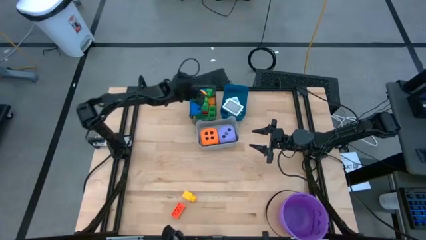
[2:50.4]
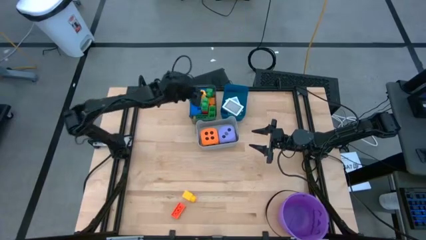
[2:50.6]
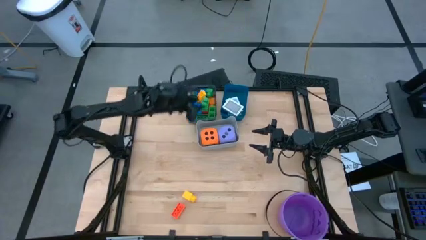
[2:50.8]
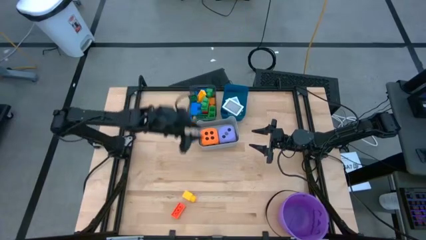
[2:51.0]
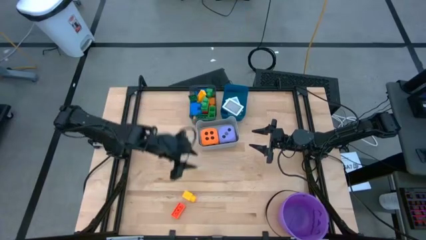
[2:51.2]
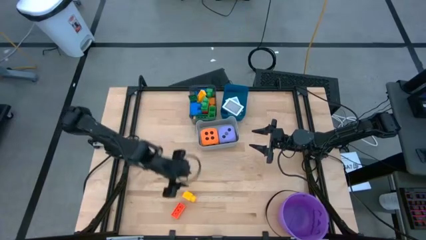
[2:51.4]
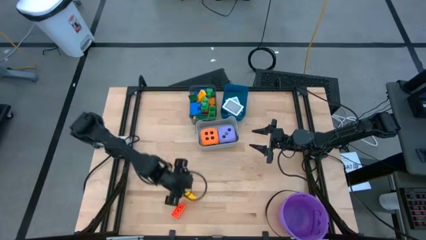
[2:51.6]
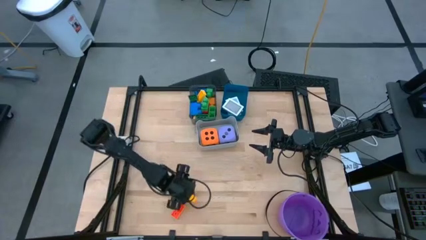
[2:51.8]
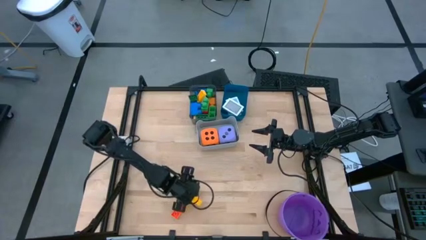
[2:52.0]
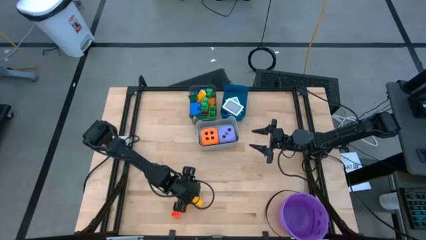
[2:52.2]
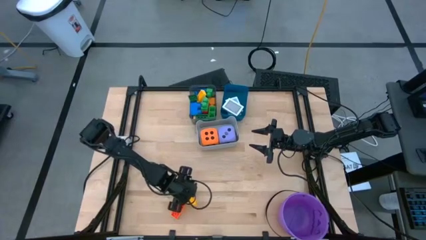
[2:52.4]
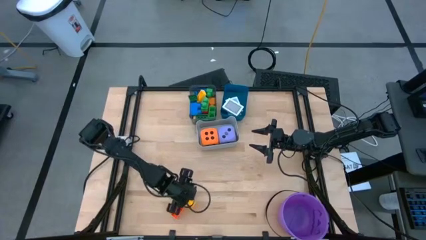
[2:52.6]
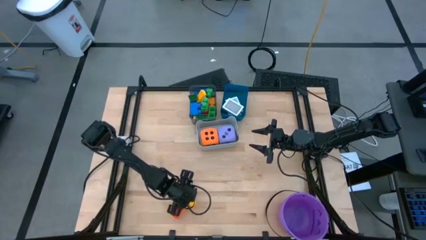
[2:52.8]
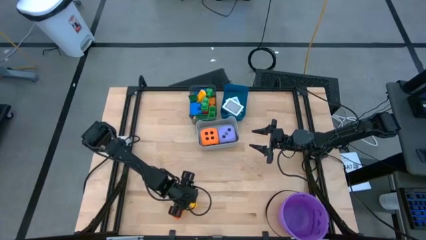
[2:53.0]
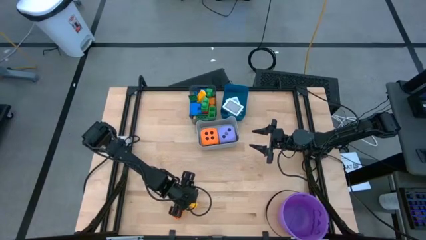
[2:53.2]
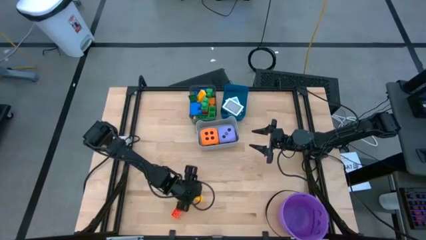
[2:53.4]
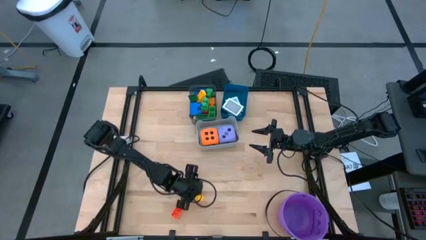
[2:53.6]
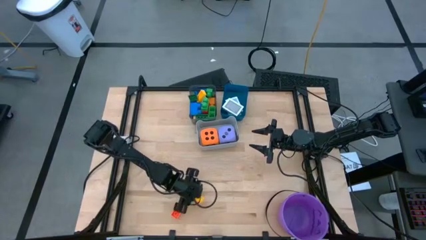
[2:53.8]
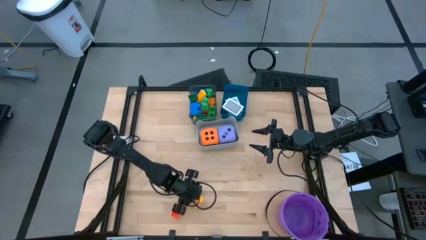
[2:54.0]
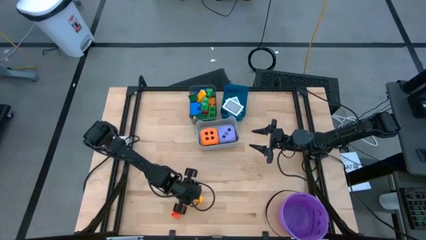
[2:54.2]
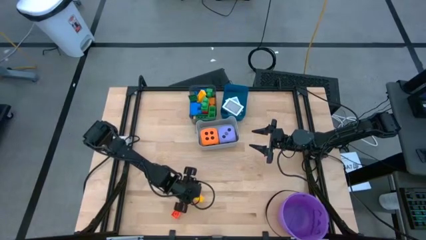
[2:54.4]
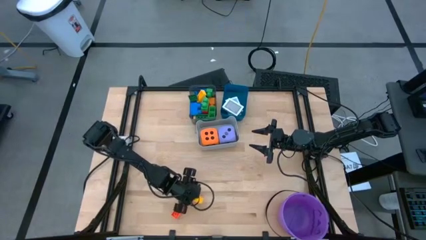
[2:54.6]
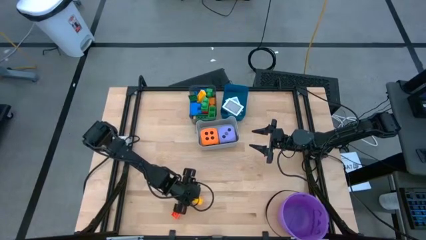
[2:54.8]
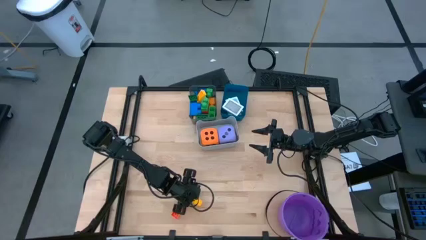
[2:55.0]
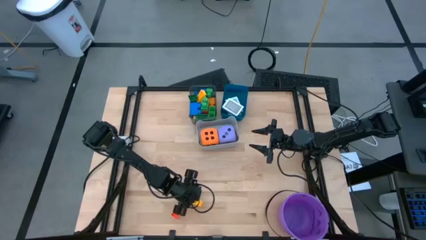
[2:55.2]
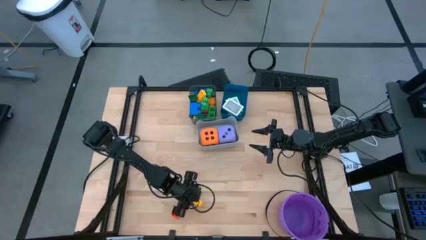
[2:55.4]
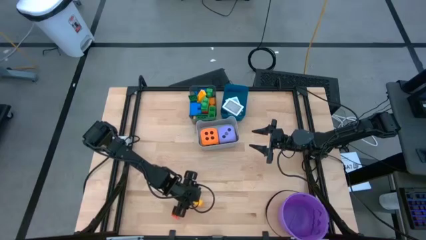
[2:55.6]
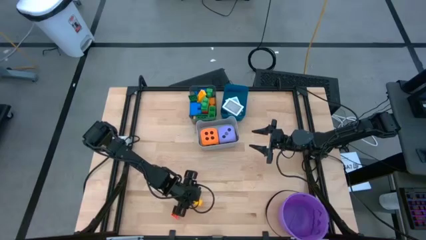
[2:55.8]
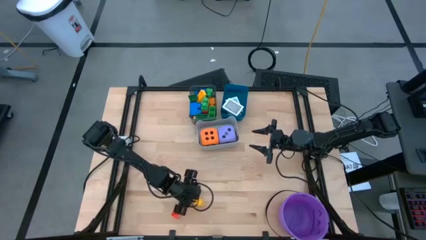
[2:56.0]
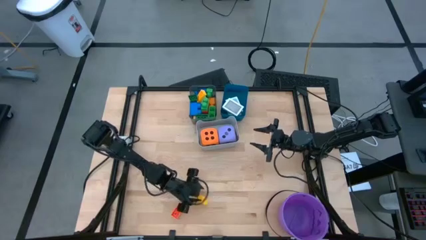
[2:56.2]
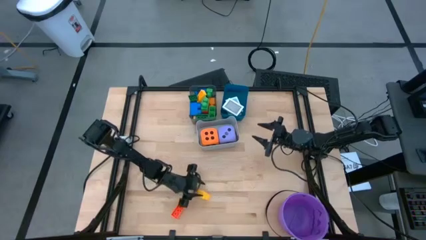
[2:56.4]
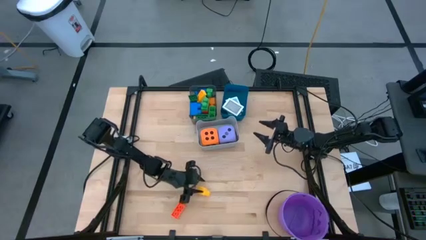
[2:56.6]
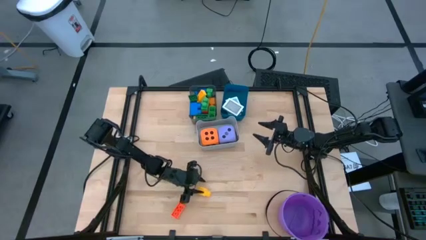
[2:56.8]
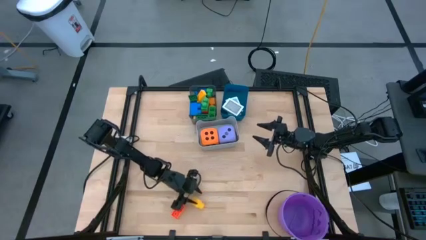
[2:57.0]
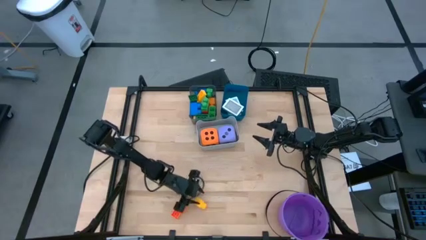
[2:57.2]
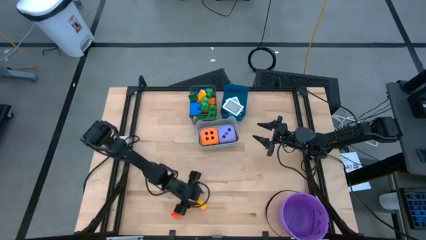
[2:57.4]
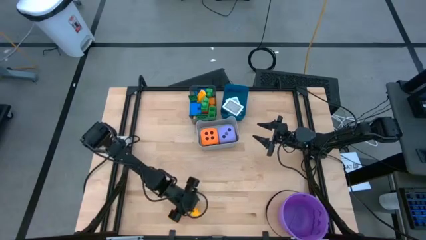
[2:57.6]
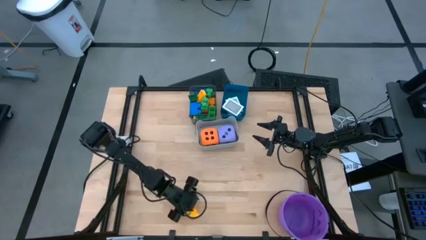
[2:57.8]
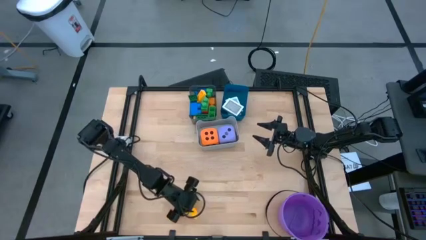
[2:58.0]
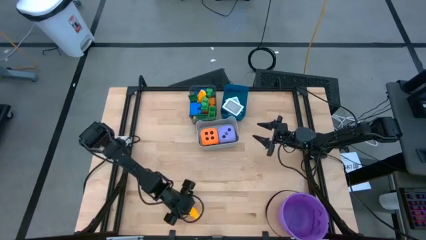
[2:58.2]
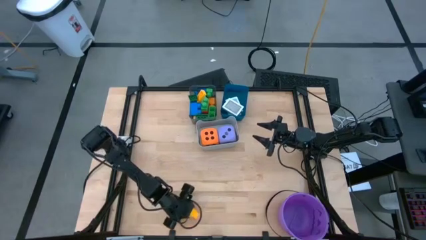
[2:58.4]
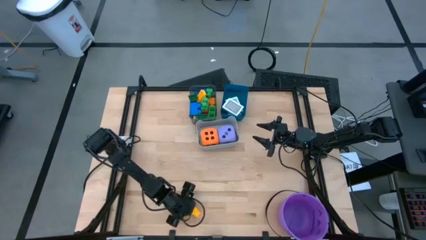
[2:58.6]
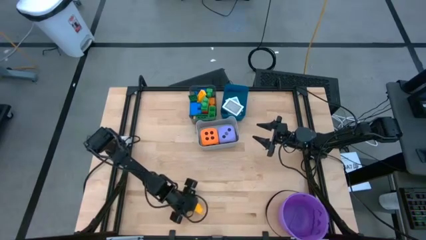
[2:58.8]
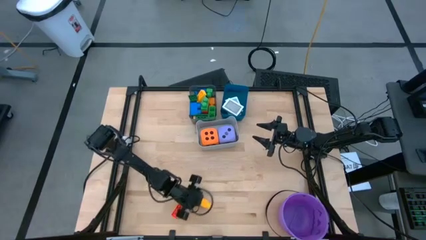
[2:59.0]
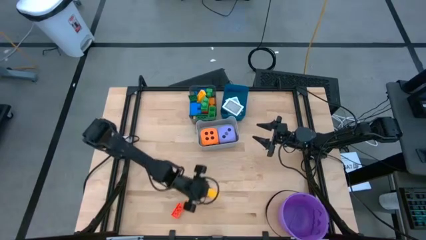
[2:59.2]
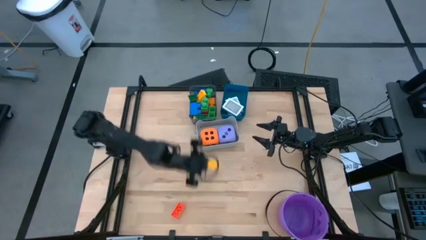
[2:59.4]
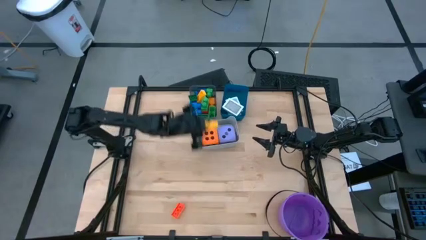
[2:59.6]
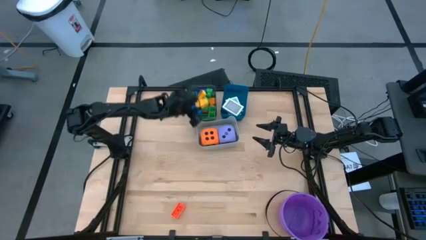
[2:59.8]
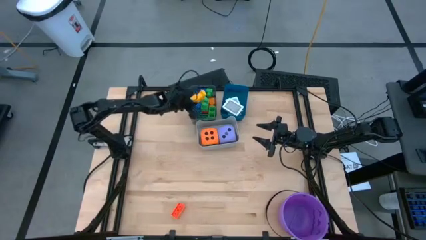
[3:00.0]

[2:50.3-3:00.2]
Task: Pick & Place Toys
Put the yellow game piece into the black bin

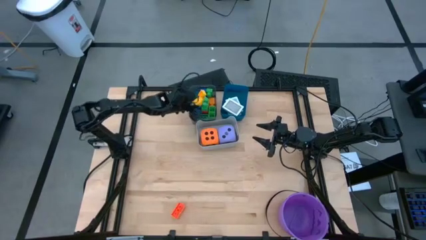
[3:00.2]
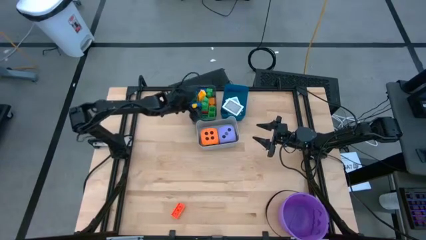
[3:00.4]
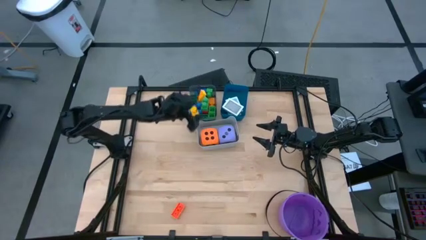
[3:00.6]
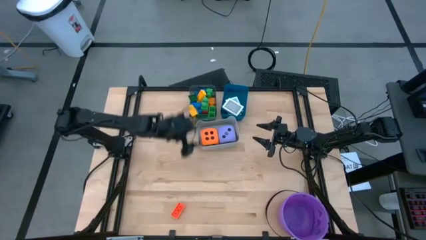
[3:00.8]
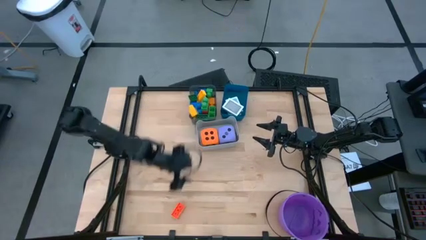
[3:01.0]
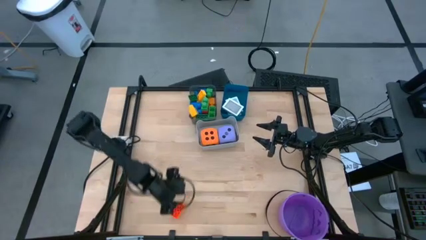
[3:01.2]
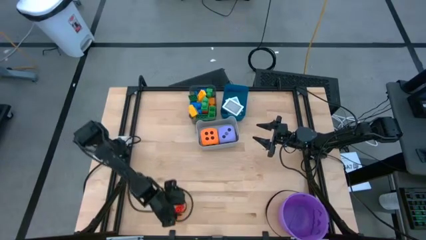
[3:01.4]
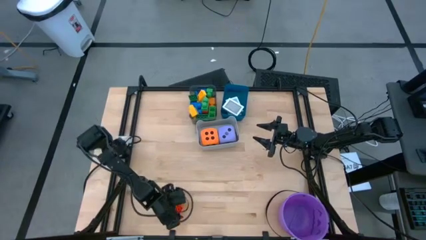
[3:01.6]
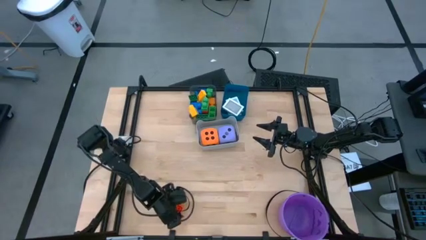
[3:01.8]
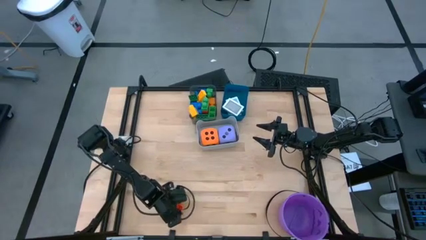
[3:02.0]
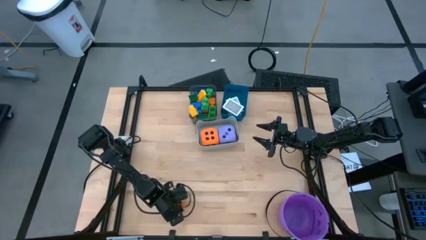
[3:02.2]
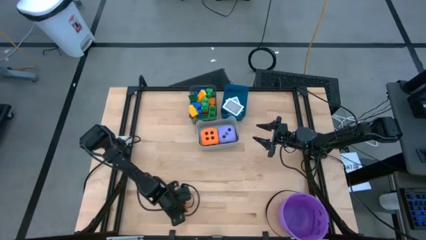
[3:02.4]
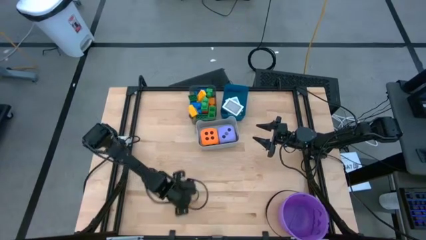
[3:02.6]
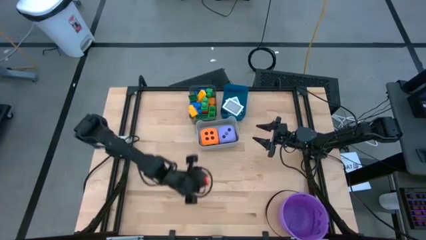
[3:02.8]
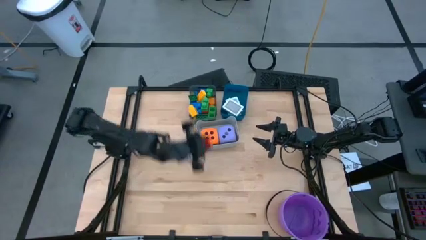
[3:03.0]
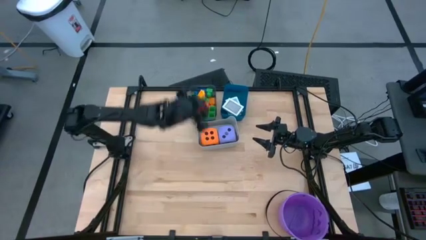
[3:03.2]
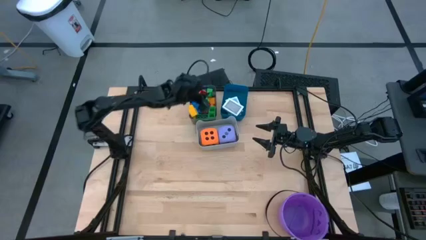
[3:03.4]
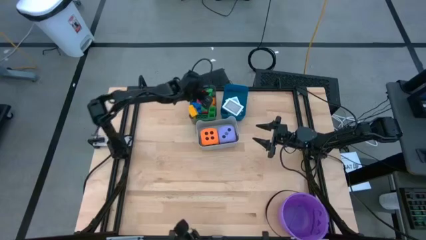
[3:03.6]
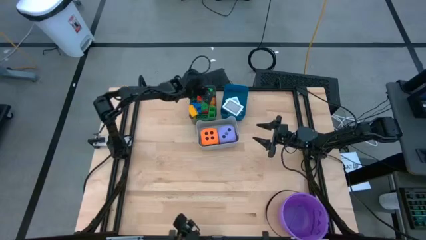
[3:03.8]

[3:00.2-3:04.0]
Put the orange game piece into the black bin
